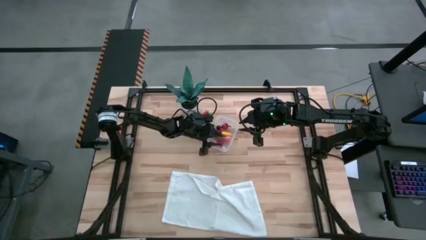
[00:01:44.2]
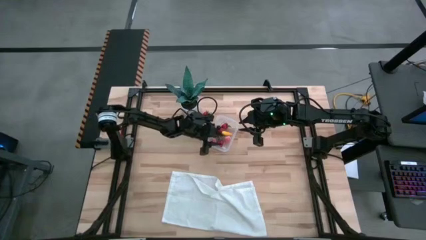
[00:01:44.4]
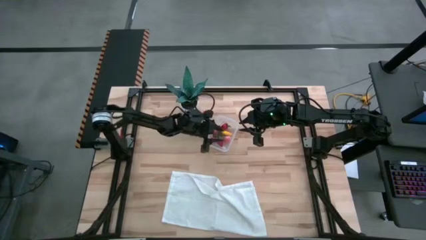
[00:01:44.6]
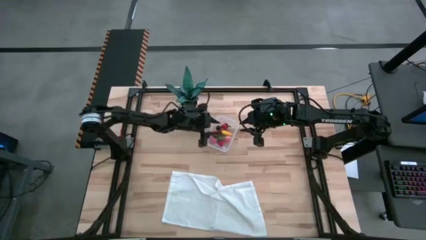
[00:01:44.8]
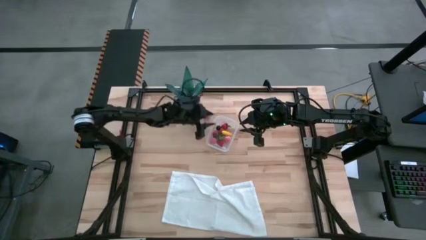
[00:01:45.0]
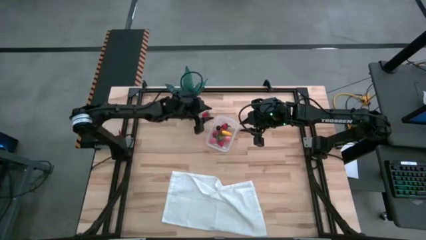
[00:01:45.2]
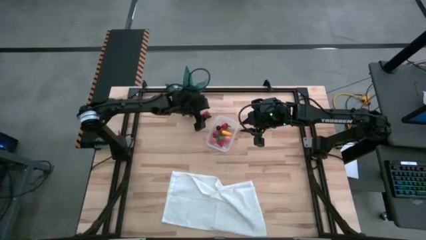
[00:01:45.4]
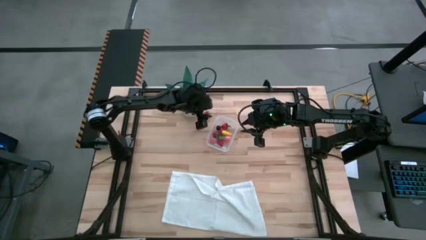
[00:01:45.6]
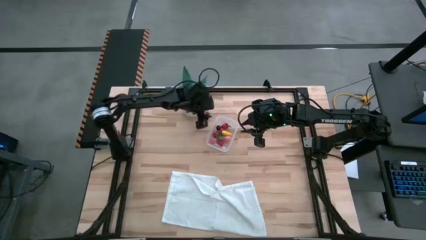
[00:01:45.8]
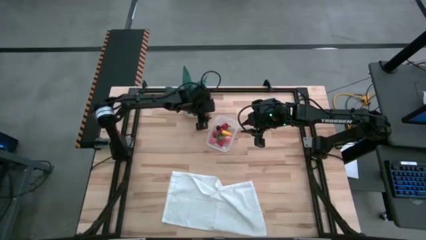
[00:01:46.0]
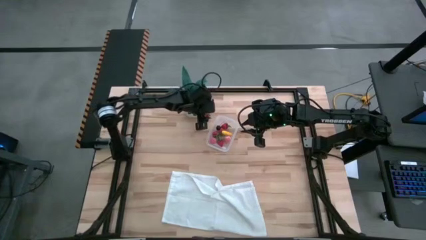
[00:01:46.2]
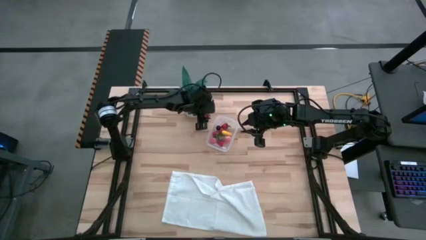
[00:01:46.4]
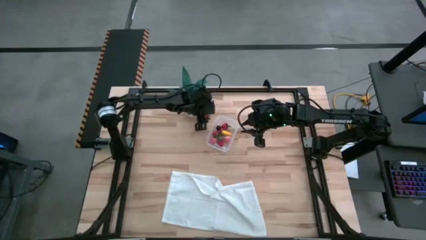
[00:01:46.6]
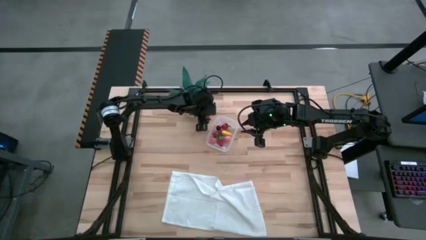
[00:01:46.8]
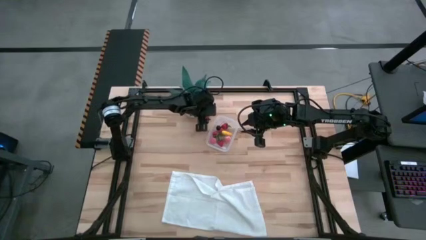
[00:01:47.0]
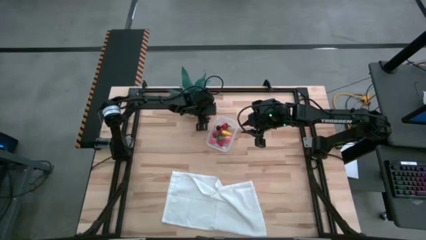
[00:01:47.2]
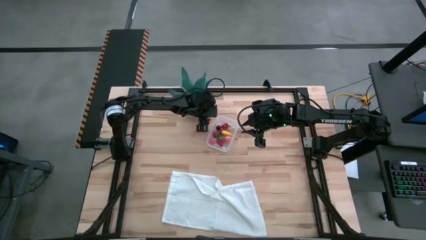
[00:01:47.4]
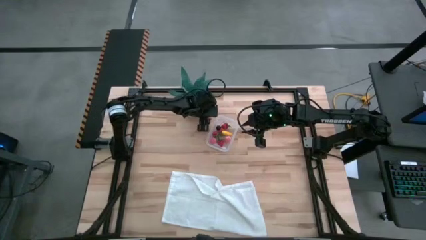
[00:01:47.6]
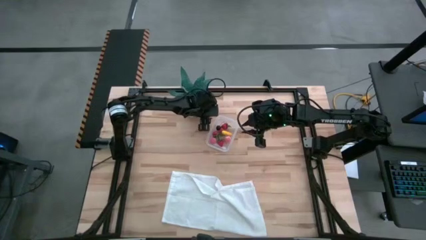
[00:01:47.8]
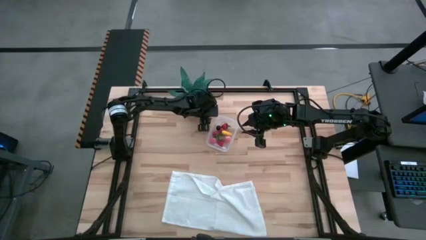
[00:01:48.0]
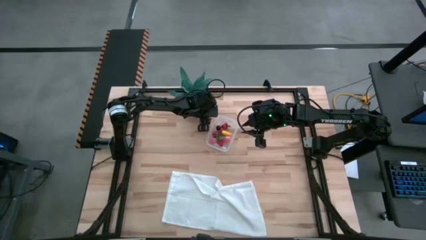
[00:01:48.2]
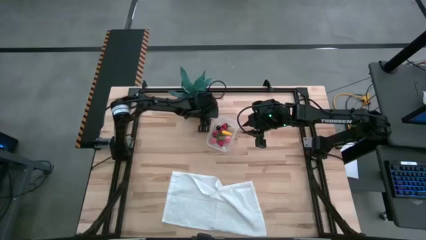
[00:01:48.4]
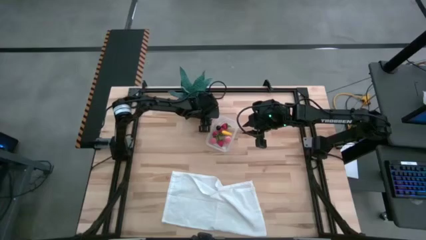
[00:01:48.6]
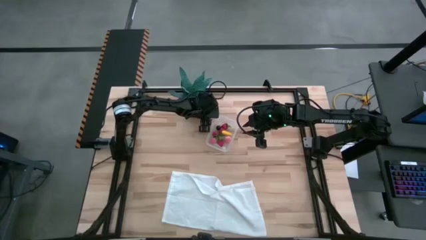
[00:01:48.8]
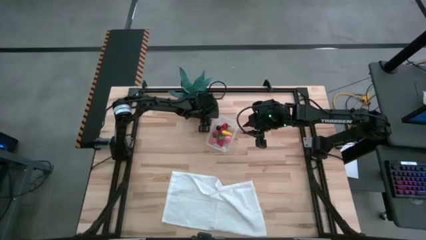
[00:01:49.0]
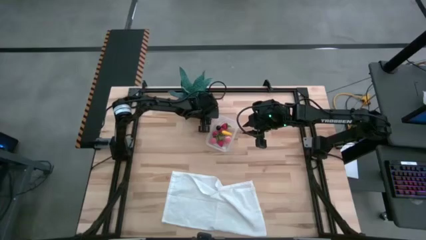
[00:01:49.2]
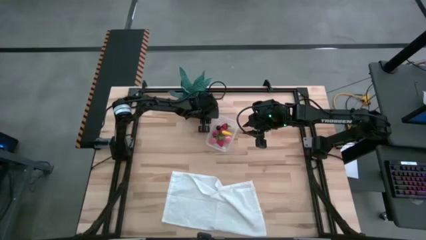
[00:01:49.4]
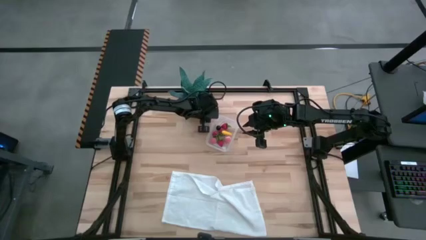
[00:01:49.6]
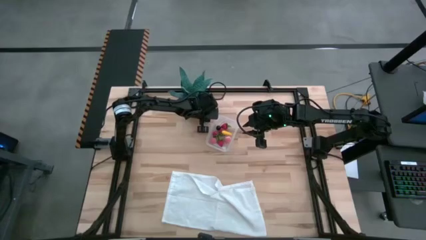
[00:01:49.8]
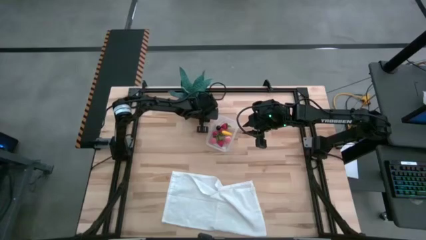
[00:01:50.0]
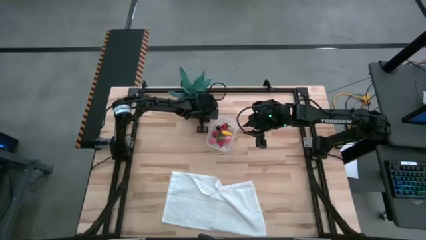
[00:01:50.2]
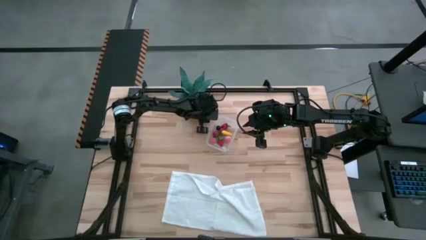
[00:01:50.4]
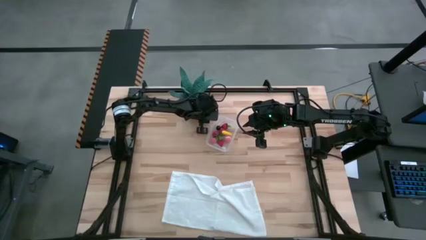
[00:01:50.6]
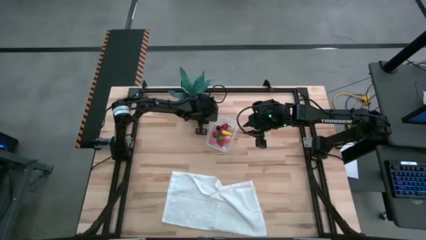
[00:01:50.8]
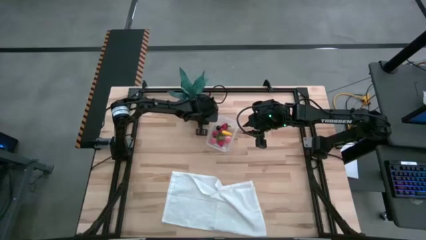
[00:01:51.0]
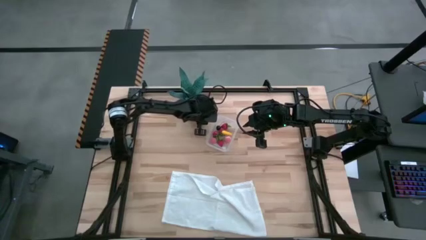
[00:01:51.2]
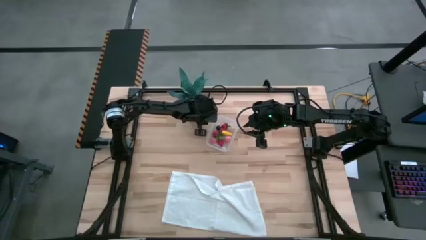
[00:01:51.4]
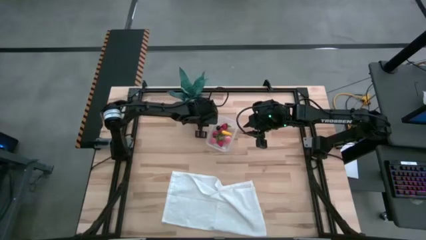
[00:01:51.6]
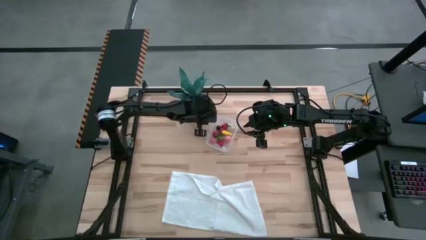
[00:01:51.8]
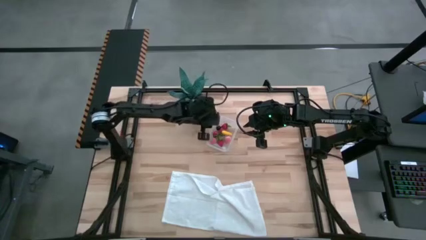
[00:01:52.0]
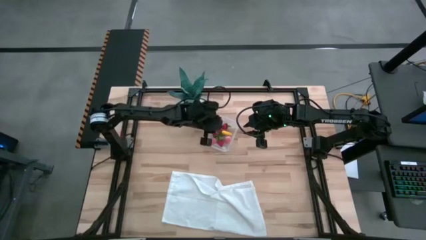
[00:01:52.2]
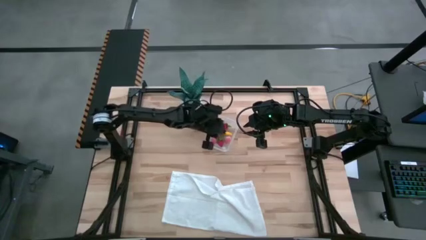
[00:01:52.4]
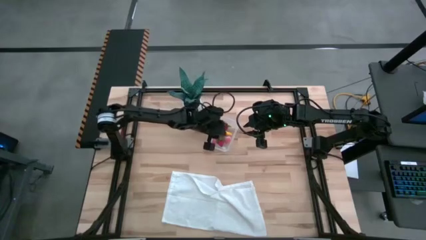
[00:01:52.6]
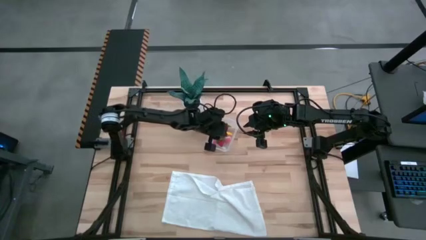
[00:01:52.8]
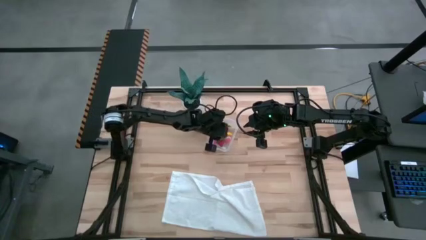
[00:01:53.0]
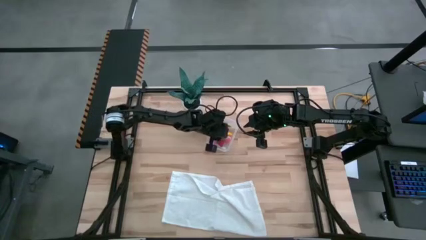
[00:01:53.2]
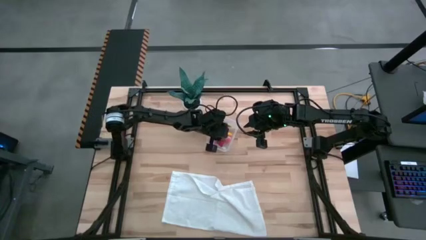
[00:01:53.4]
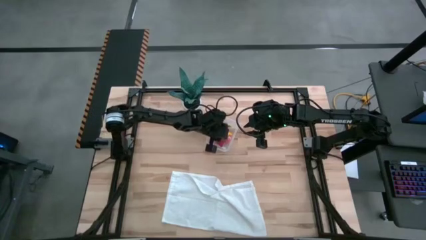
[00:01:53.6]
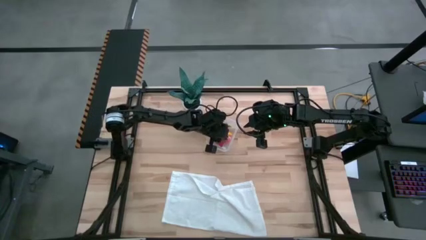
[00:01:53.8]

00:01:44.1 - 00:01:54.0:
Task: Pick and placing Produce into tupperware
Put the red strawberry into the transparent bin

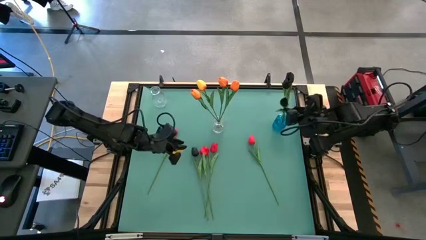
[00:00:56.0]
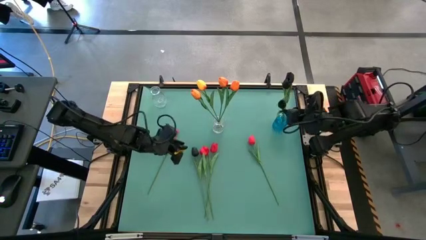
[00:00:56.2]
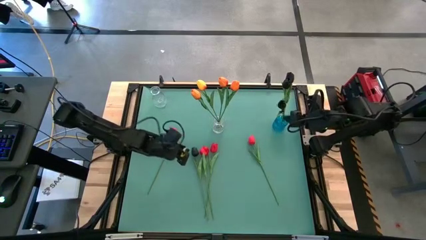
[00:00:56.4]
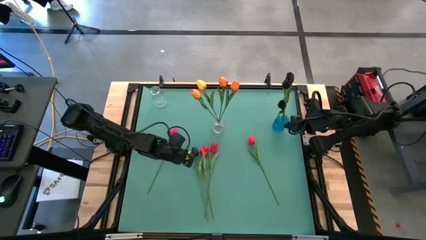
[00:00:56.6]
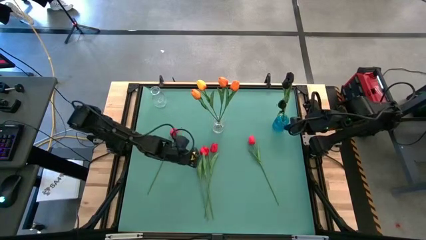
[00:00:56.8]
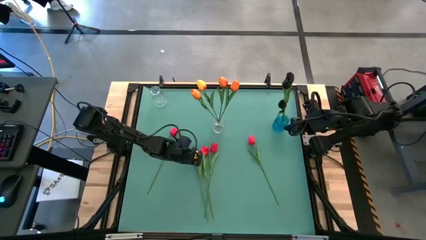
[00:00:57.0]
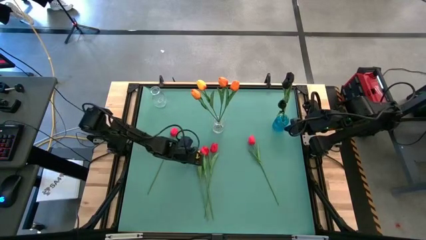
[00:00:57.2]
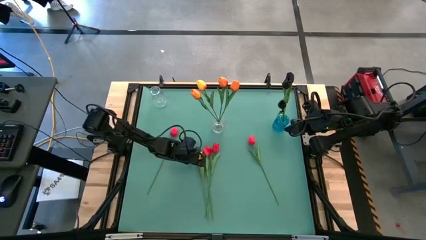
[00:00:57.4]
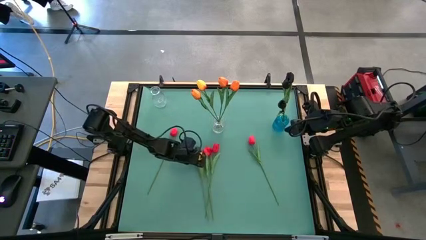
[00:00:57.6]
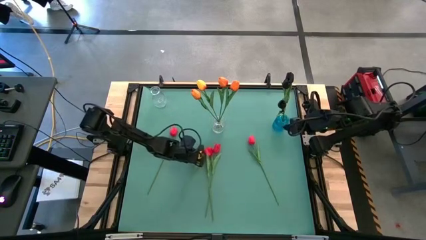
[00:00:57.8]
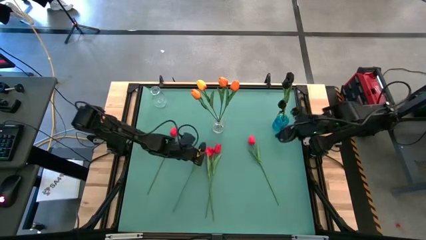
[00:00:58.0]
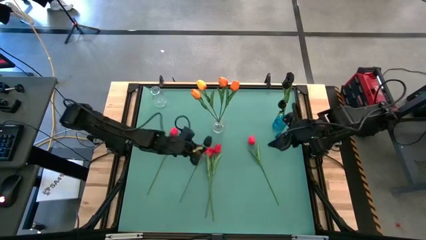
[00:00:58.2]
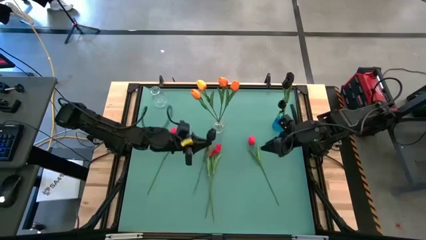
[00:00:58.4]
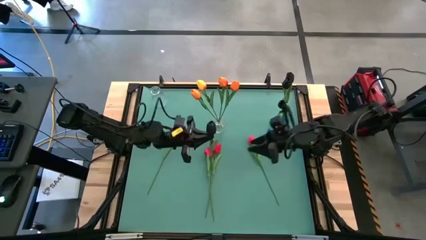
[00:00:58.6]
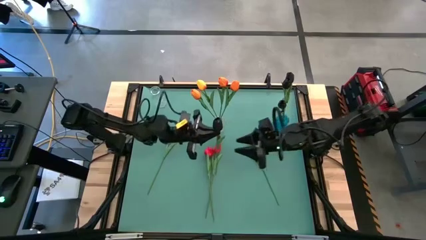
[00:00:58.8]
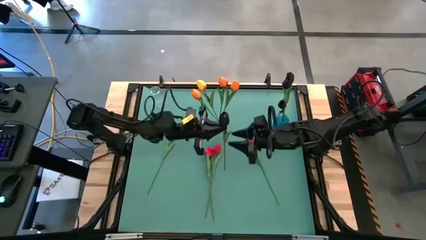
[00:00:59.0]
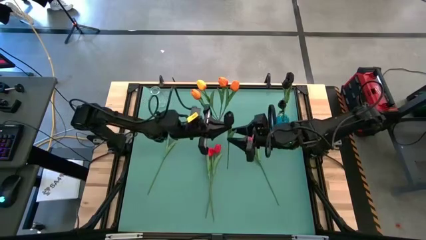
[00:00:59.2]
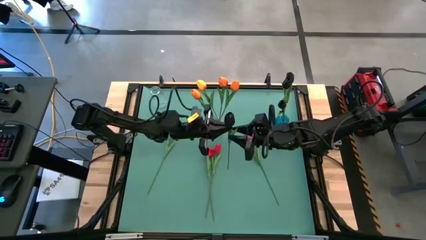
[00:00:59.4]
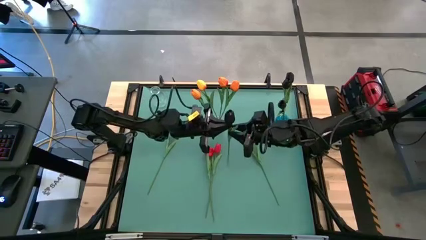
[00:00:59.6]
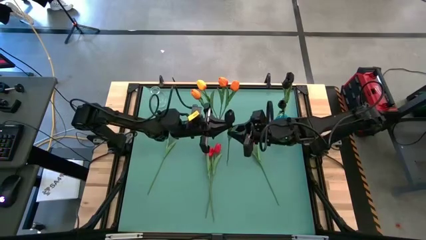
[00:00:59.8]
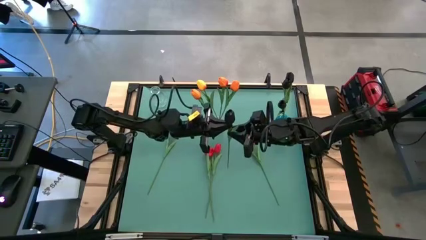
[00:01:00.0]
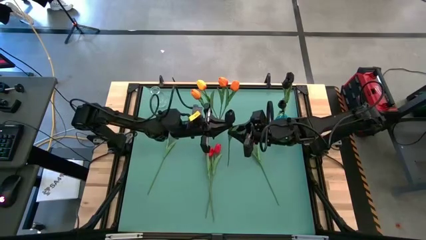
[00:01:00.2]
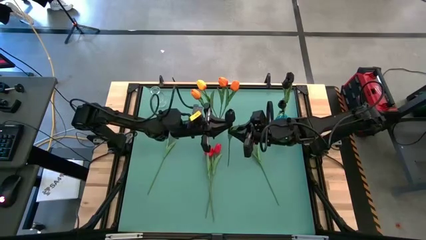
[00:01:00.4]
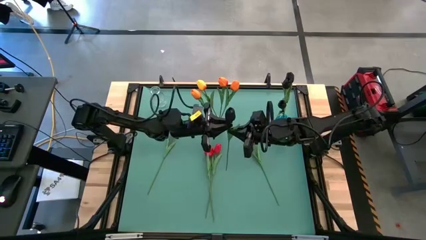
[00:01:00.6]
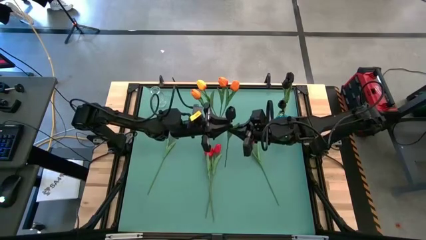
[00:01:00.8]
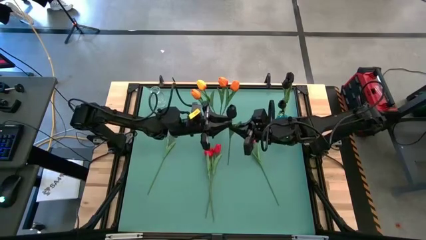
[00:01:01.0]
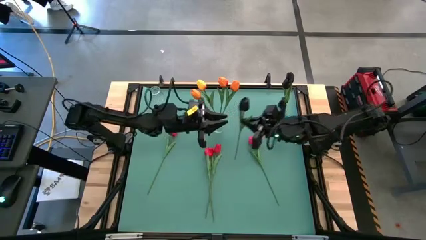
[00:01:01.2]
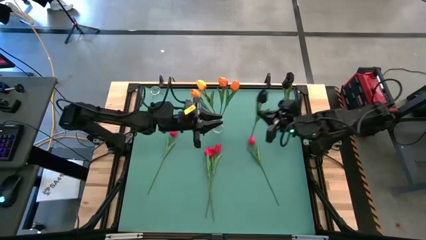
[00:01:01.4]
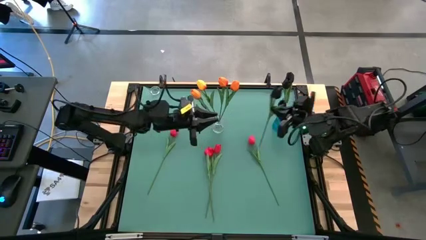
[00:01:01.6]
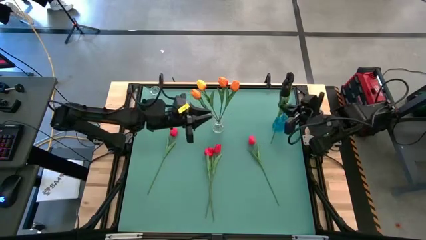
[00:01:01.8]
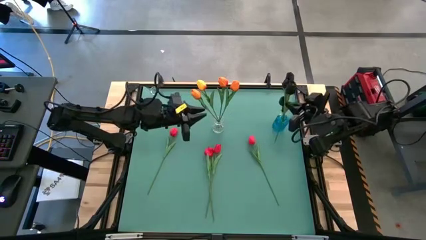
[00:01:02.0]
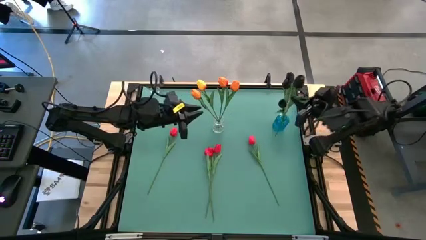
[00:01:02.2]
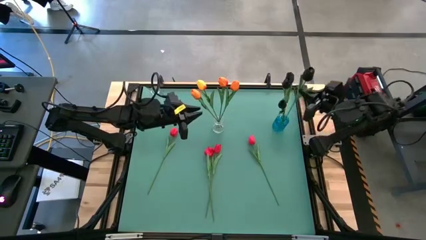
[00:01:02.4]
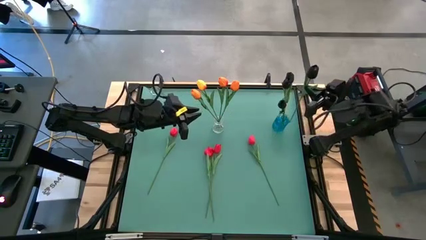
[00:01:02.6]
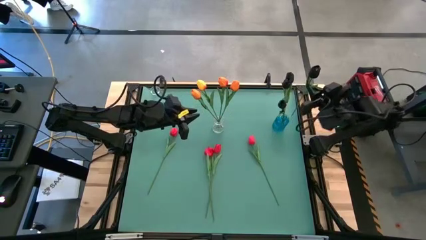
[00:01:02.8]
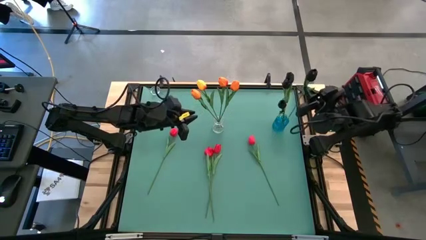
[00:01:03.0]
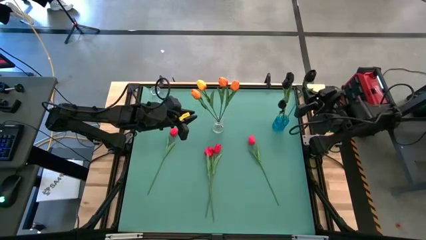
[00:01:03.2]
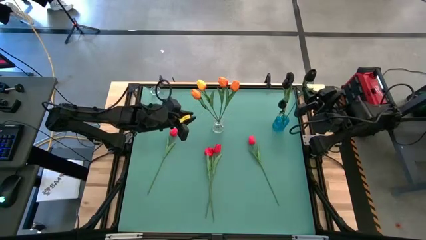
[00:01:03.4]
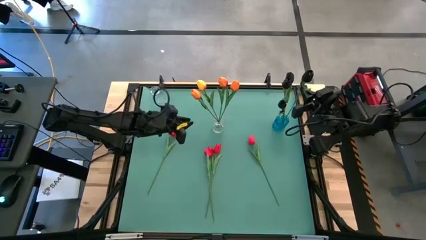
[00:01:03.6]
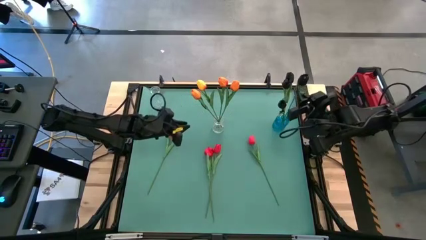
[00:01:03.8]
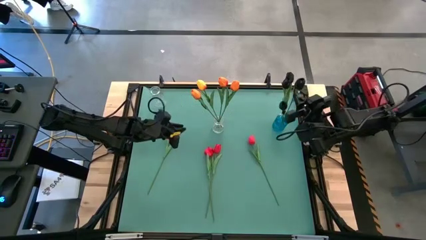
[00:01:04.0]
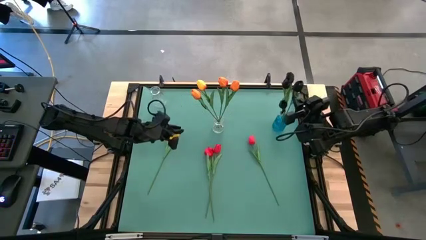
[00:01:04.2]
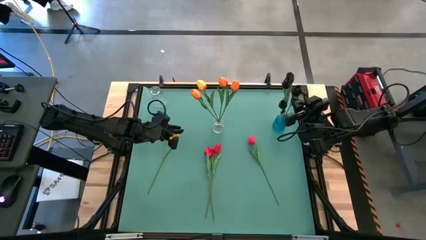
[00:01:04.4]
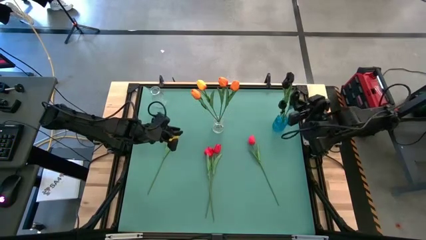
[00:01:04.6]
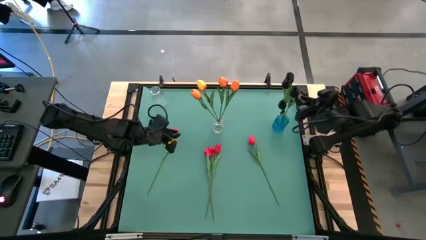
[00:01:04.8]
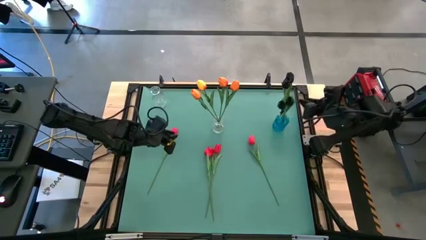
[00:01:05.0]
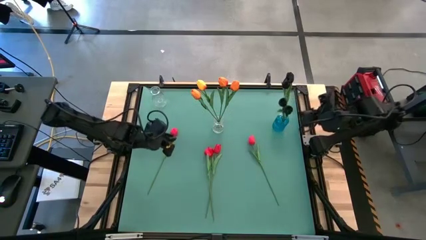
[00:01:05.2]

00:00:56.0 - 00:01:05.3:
Task: Sort flowers into vase by color
Put the black tulip into the blue vase
